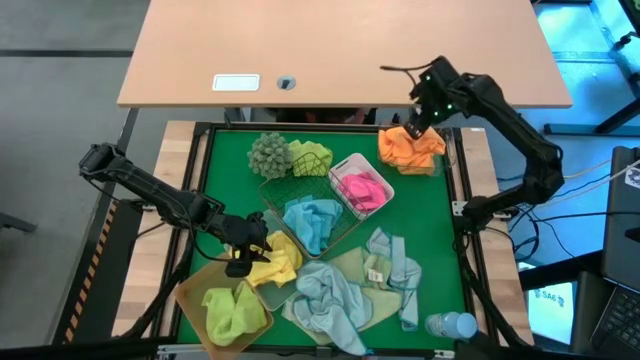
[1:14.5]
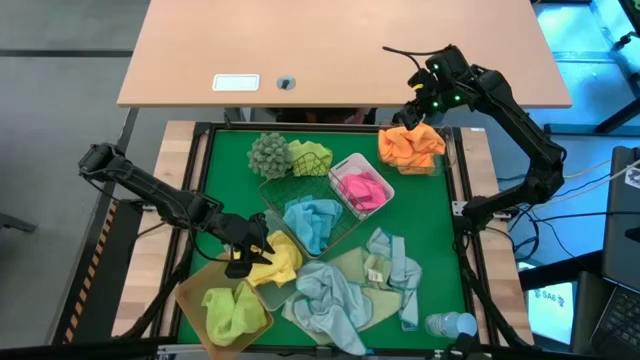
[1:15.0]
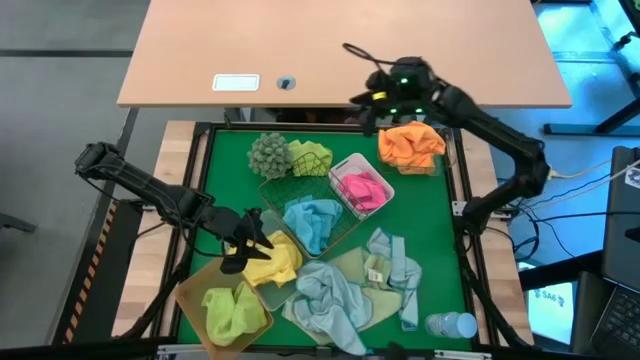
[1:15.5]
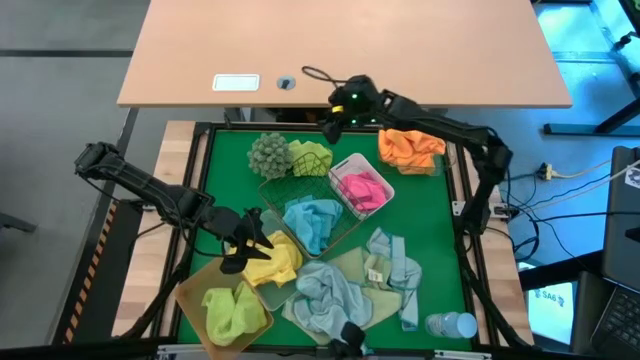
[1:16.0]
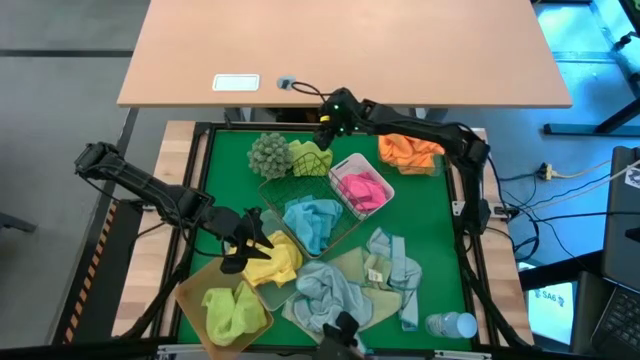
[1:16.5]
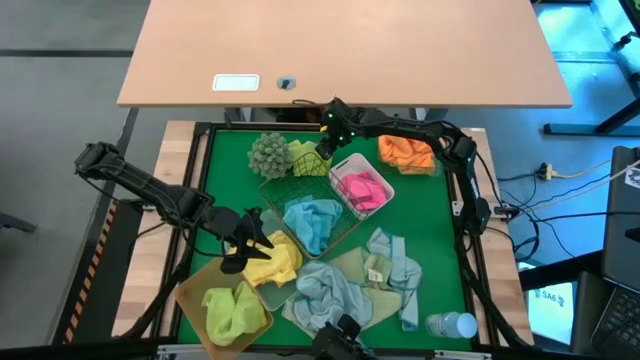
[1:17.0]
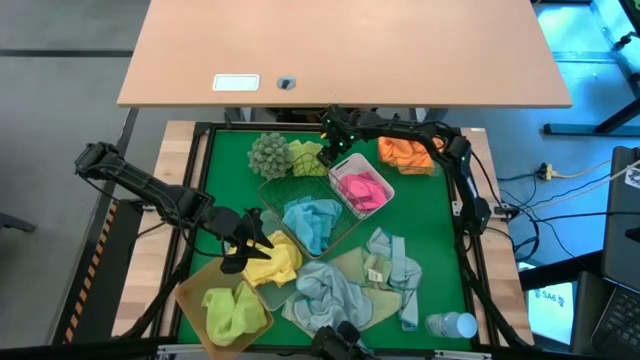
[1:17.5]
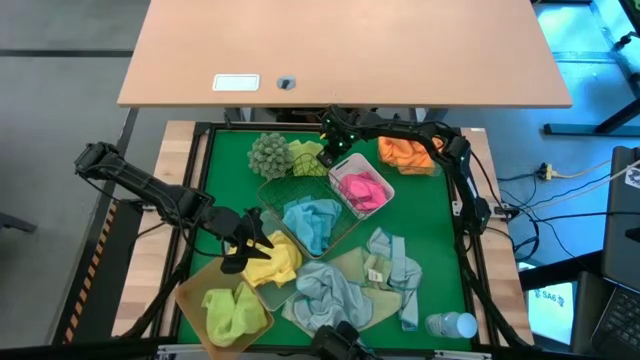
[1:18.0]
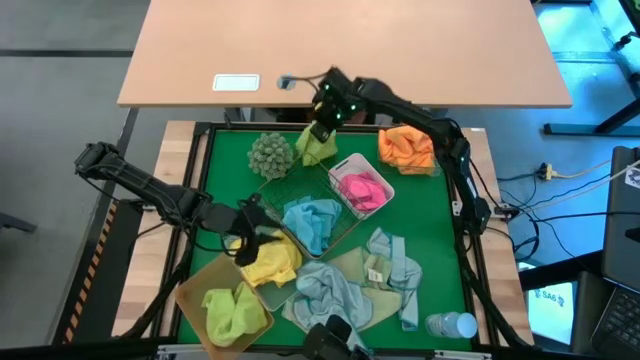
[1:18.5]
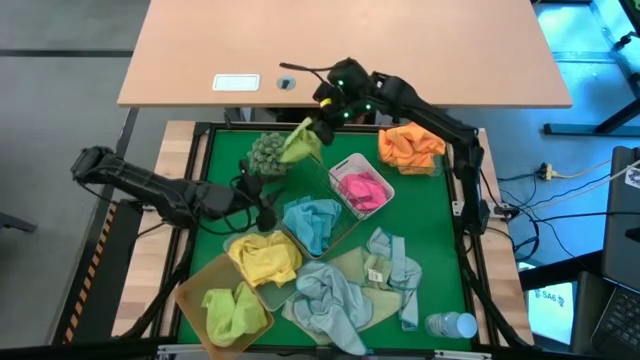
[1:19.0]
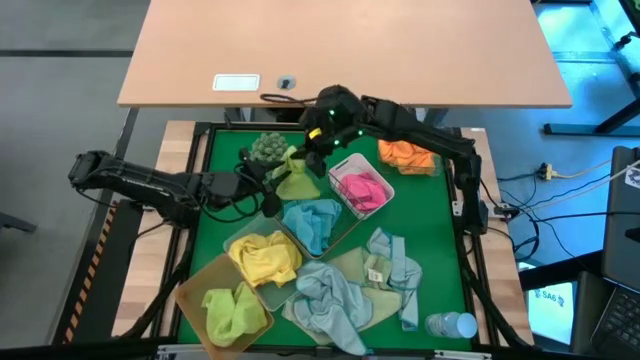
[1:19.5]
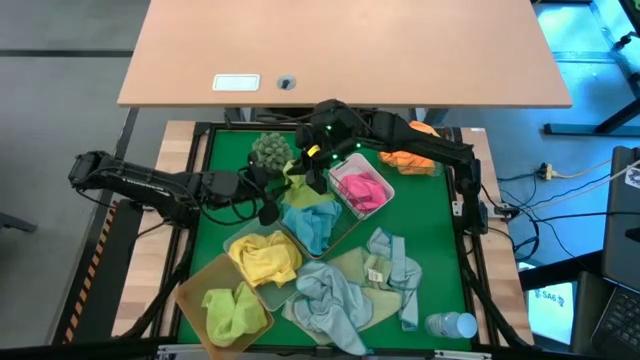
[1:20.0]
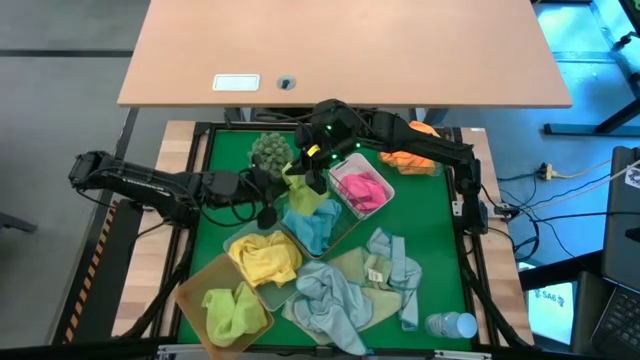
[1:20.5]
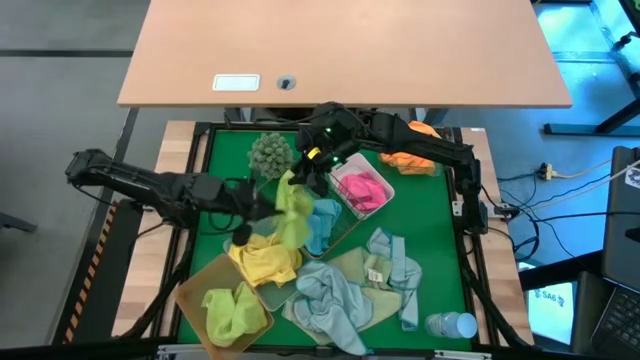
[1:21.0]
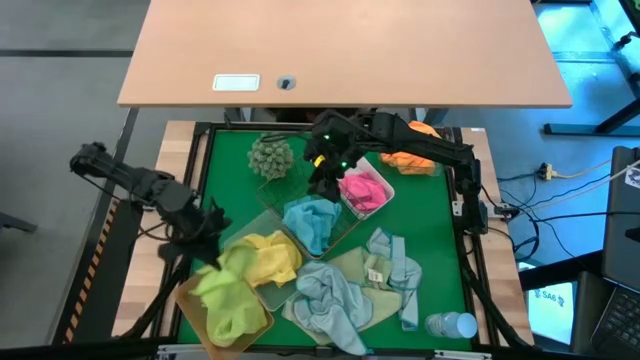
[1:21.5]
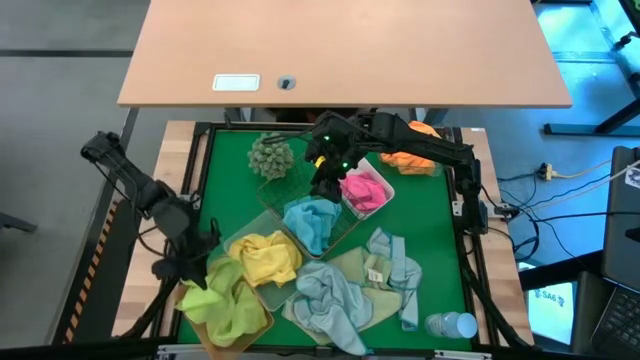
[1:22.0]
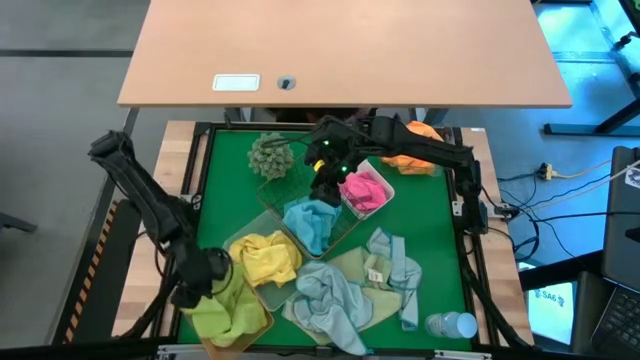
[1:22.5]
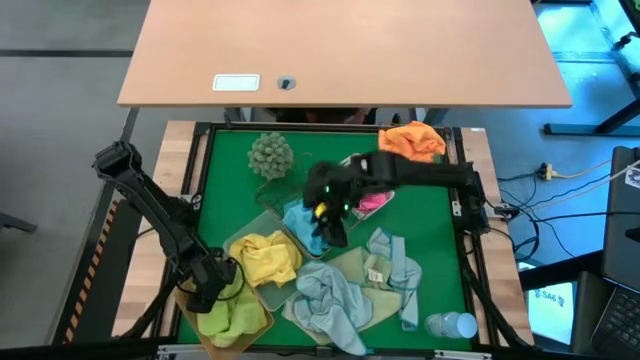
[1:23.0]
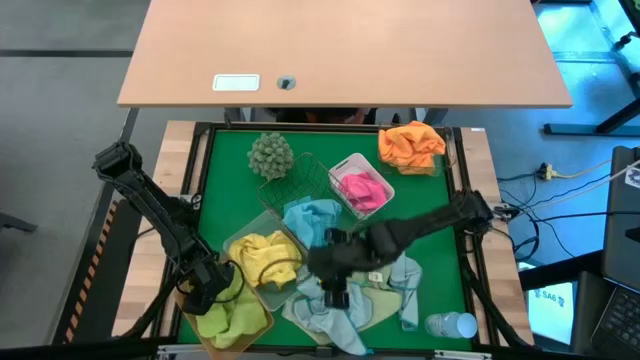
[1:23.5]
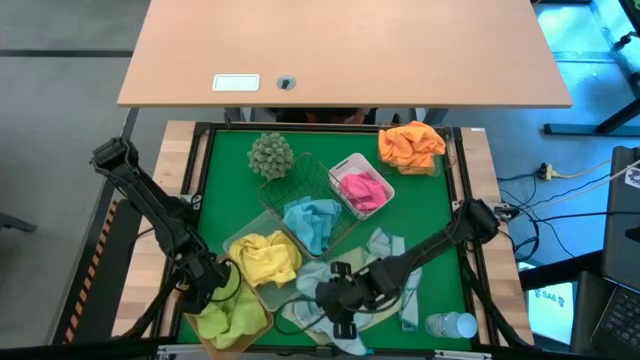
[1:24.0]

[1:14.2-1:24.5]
Task: Sort microfiber towel by color & place in baskets
Put the green towel into the orange bin

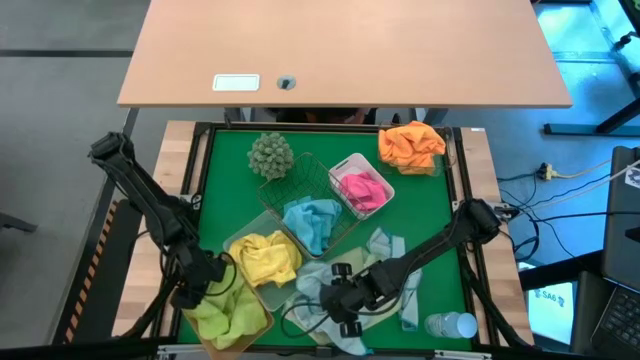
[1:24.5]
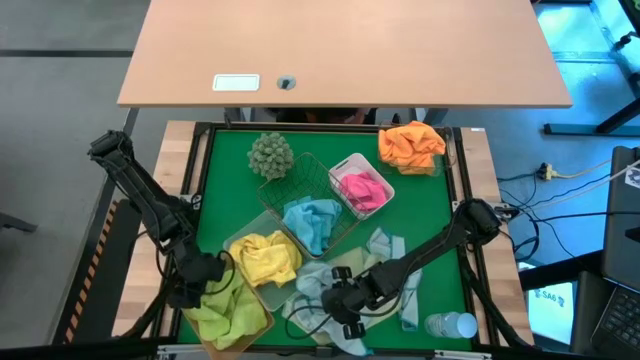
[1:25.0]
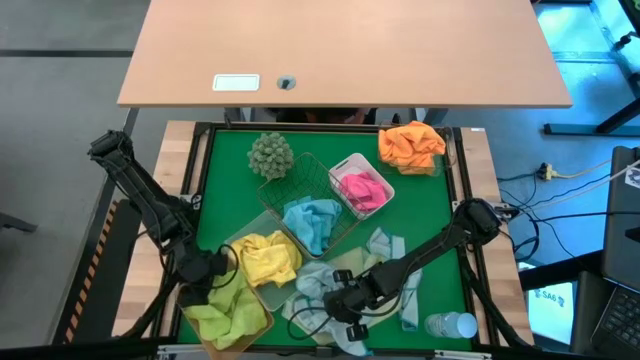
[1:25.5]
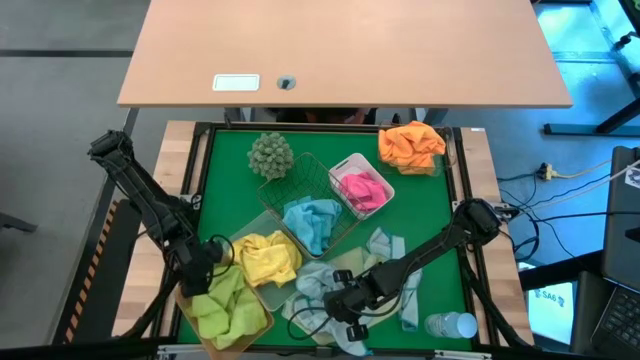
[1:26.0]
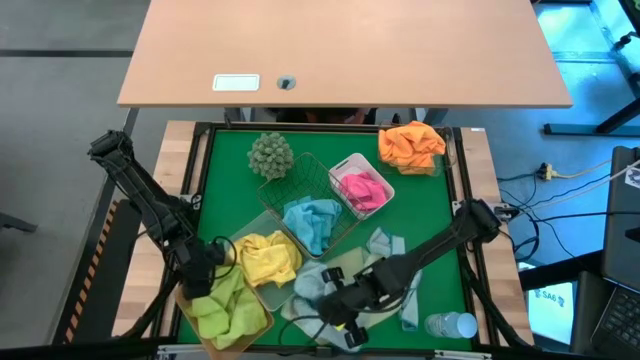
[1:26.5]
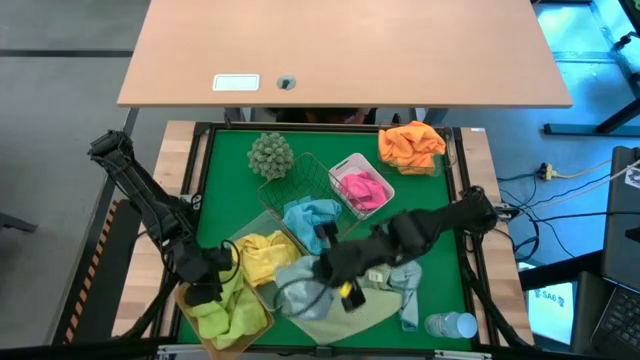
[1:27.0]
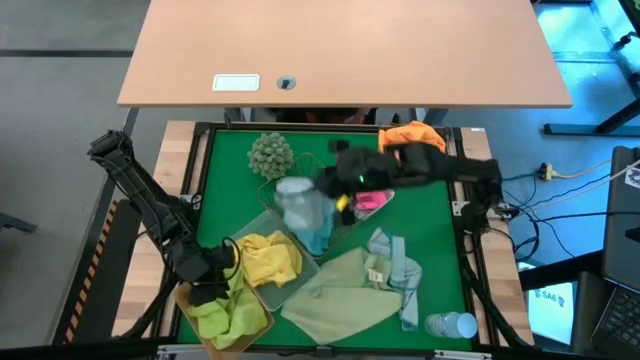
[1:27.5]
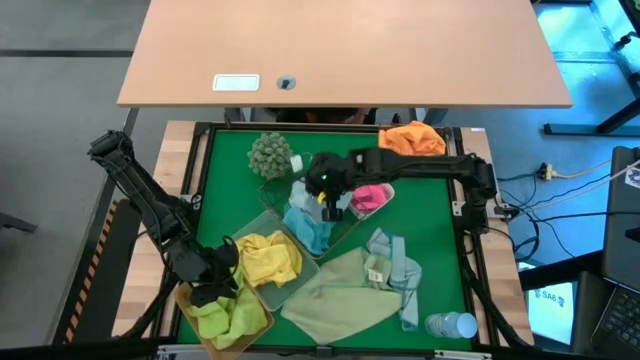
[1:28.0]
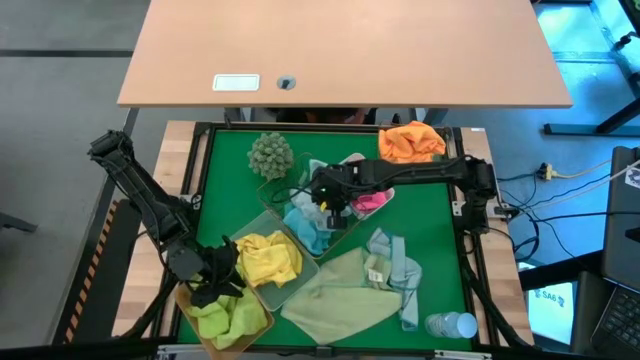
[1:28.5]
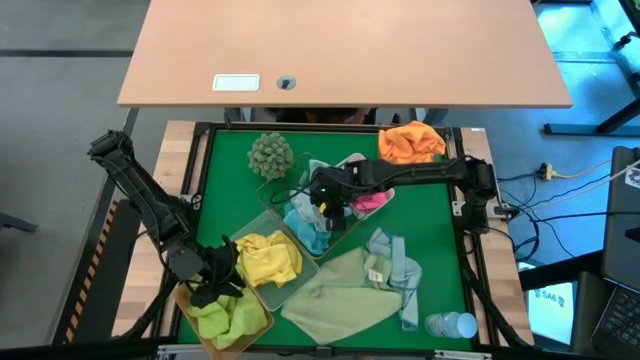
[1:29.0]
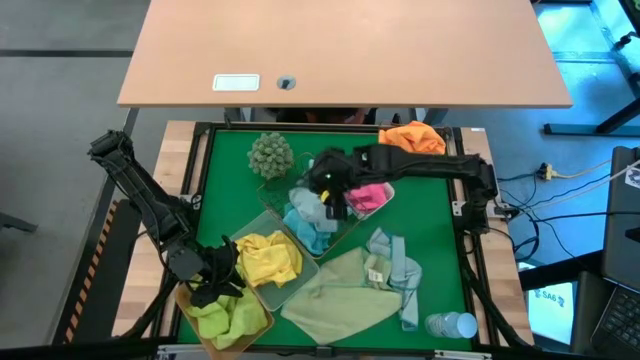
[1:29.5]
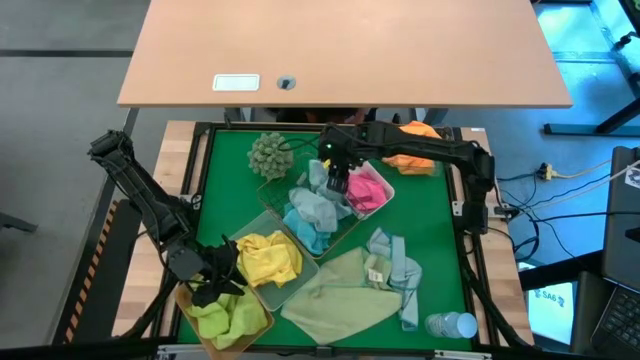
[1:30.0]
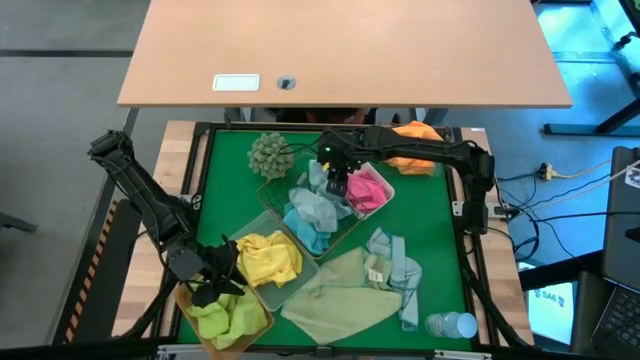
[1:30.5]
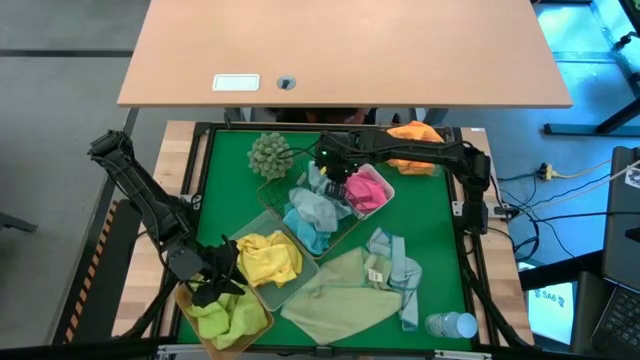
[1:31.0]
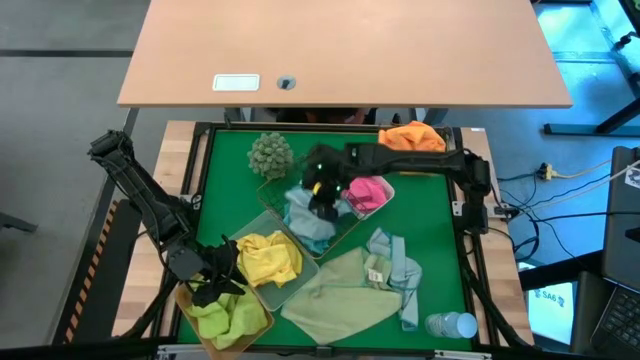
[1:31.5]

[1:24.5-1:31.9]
Put the blue towel into the black bin

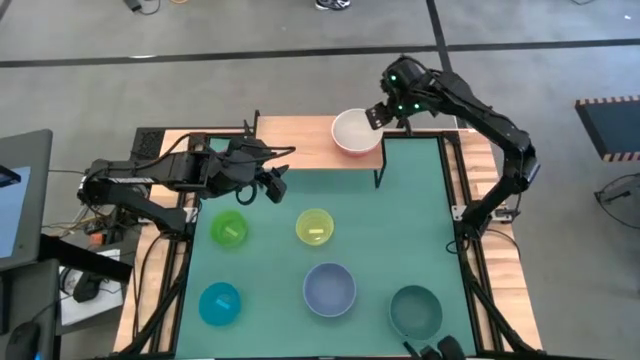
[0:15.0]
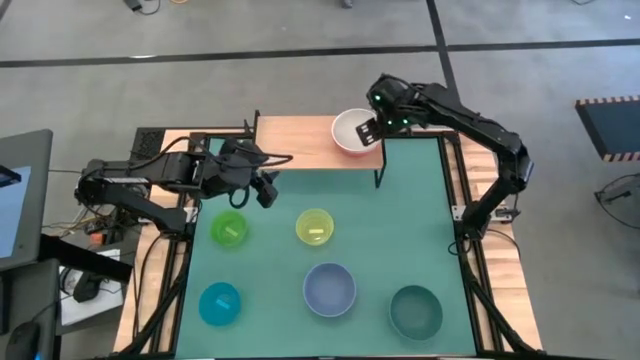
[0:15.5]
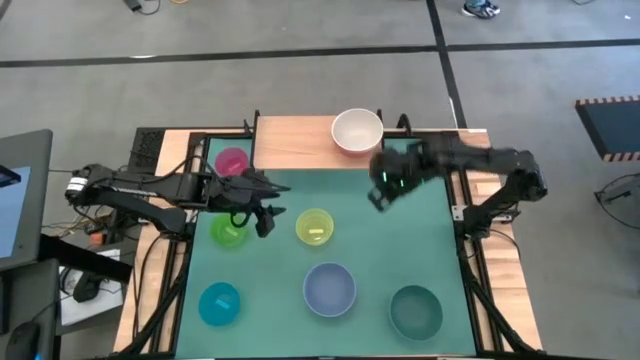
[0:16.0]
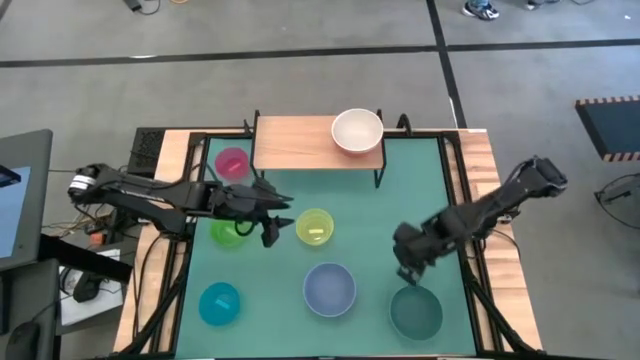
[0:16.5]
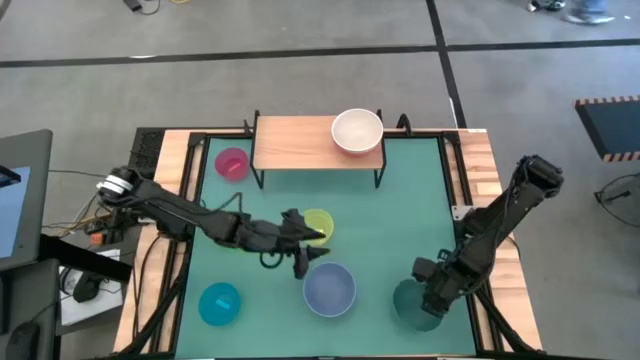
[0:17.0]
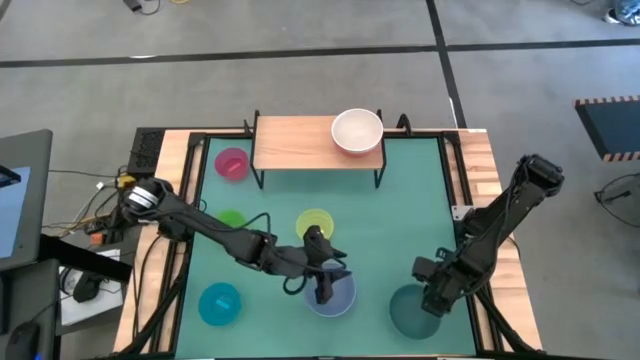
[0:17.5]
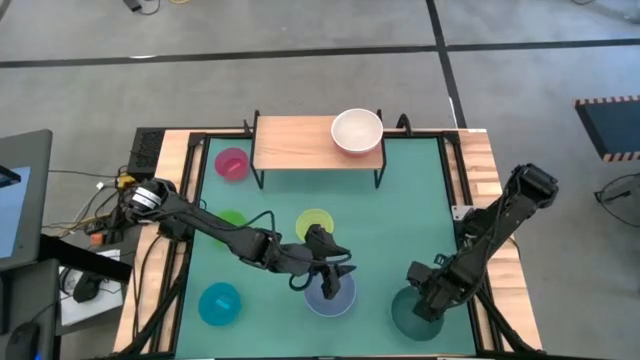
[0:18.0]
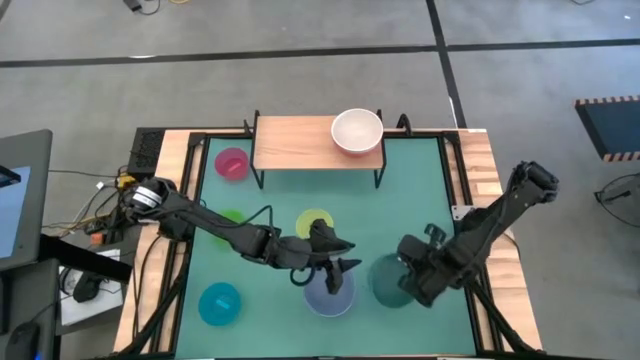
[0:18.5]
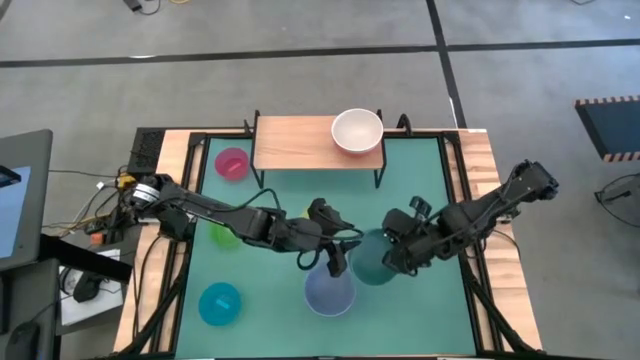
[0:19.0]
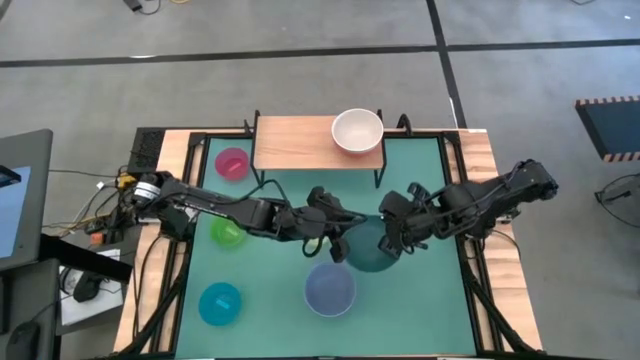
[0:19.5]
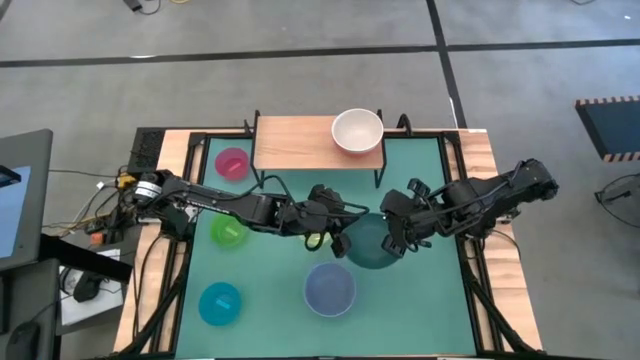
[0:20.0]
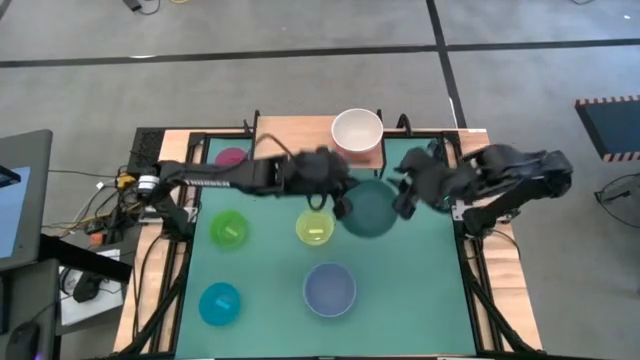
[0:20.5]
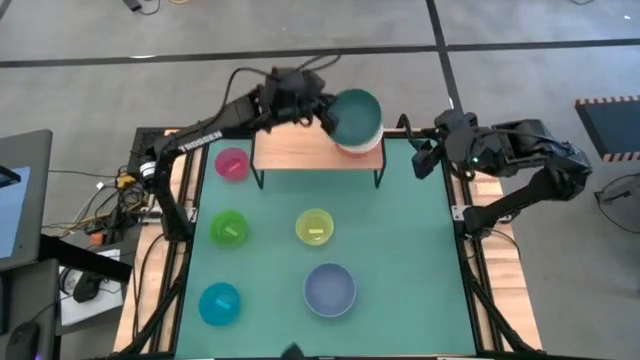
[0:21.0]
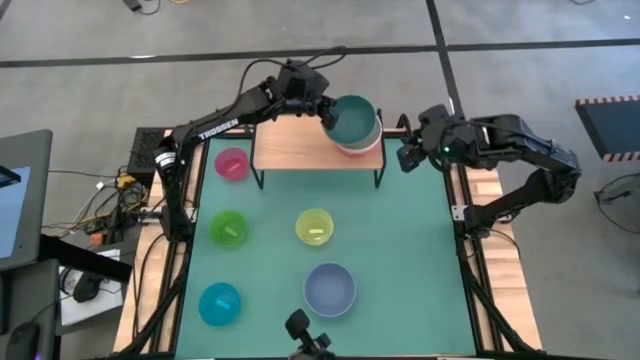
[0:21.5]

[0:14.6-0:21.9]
Task: Place and stack bowls onto a shelf
Stack the green bowl on the white bowl on the shelf
